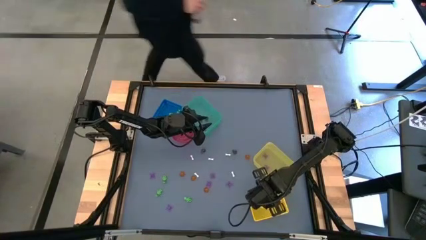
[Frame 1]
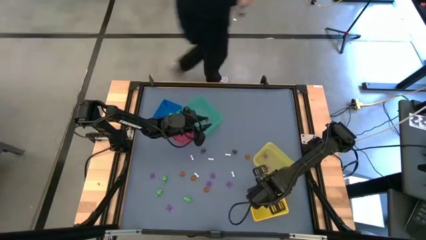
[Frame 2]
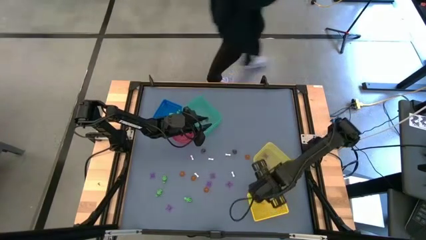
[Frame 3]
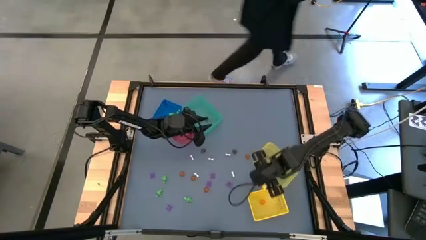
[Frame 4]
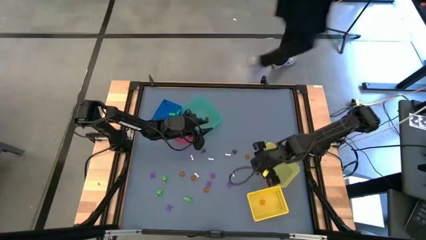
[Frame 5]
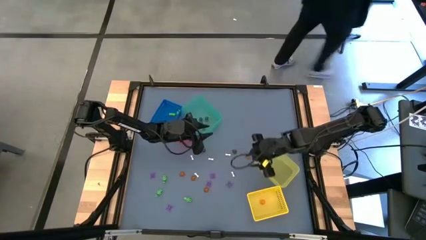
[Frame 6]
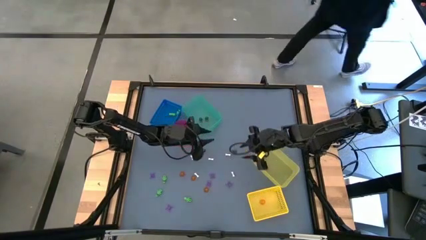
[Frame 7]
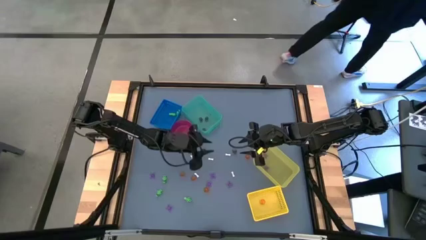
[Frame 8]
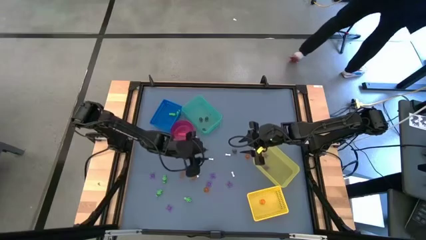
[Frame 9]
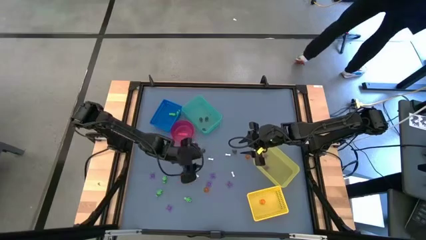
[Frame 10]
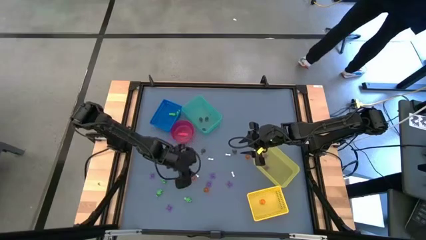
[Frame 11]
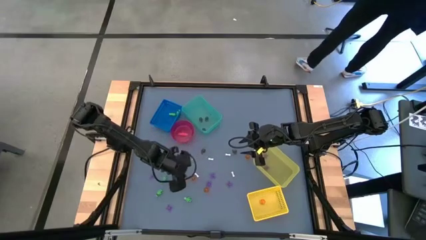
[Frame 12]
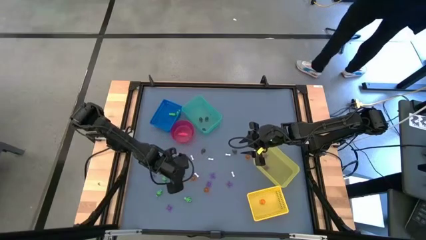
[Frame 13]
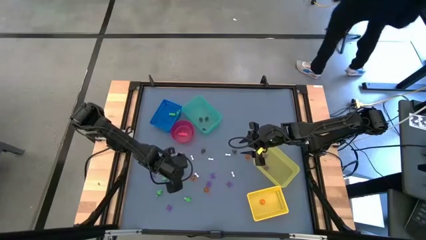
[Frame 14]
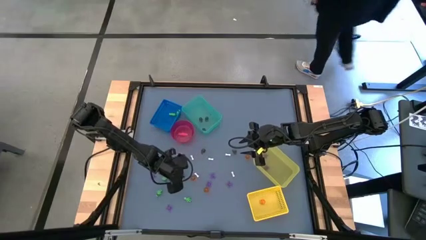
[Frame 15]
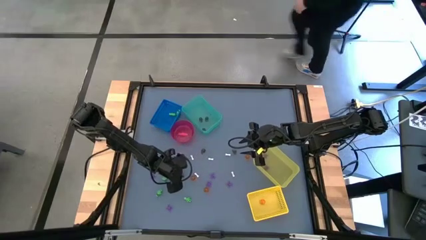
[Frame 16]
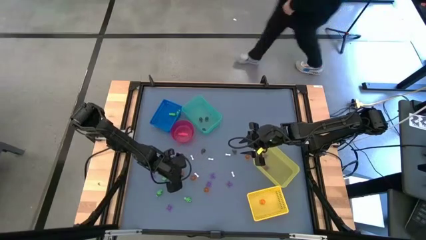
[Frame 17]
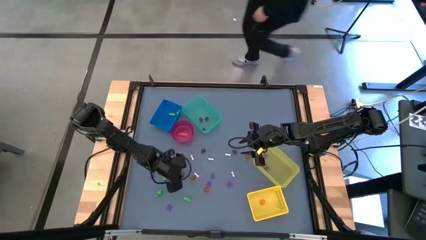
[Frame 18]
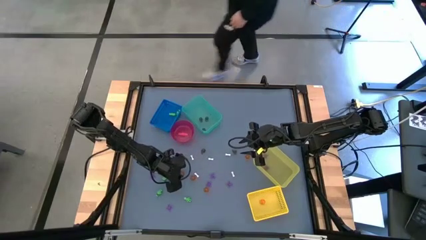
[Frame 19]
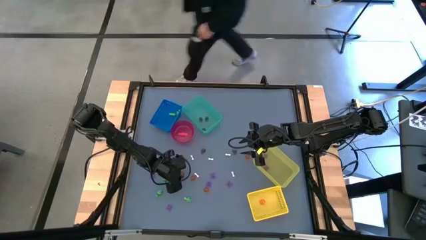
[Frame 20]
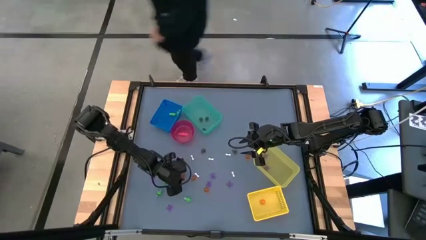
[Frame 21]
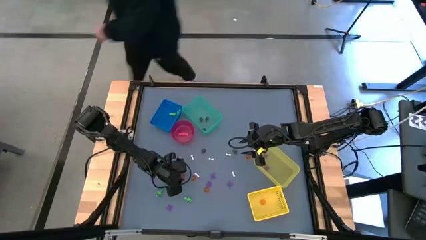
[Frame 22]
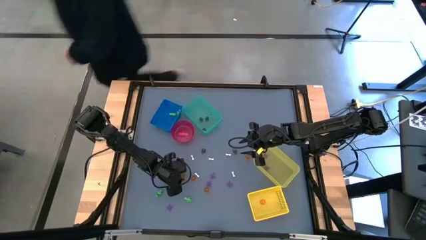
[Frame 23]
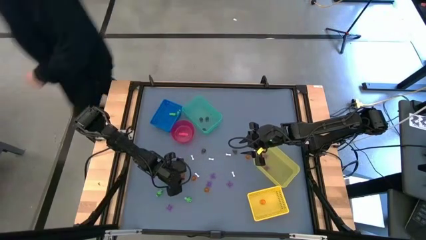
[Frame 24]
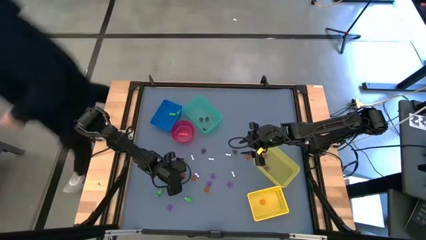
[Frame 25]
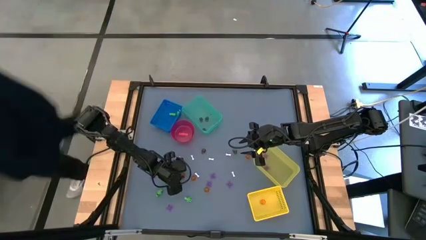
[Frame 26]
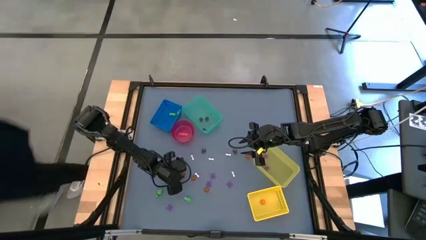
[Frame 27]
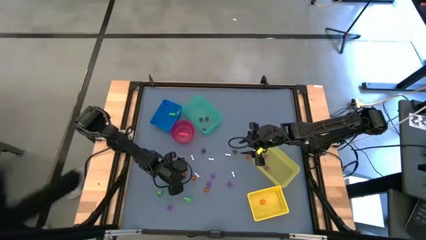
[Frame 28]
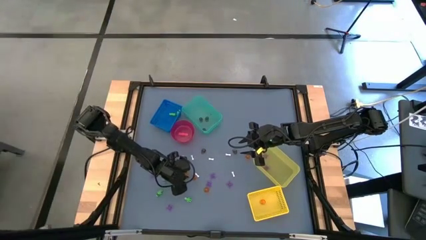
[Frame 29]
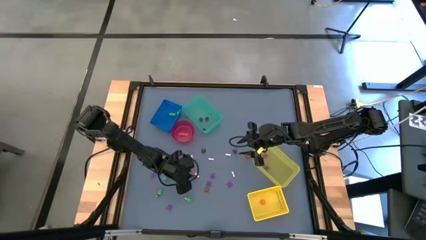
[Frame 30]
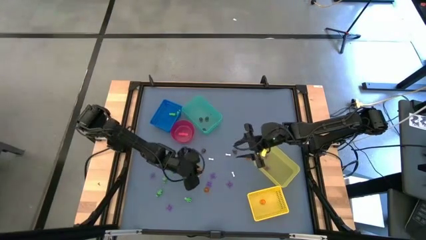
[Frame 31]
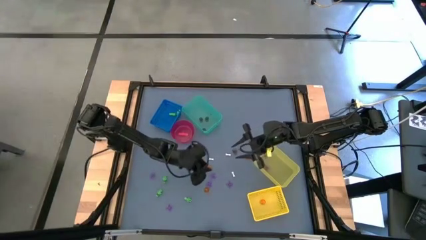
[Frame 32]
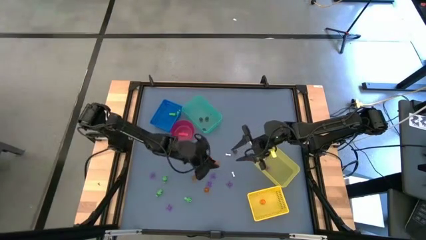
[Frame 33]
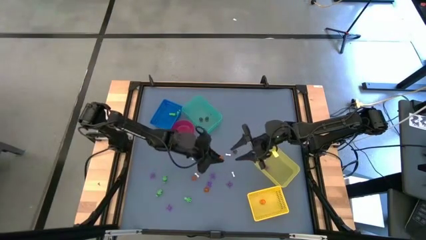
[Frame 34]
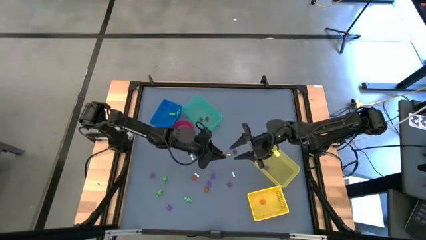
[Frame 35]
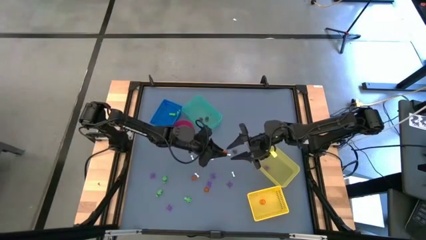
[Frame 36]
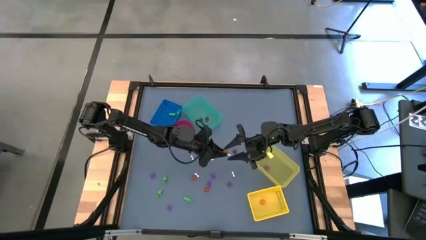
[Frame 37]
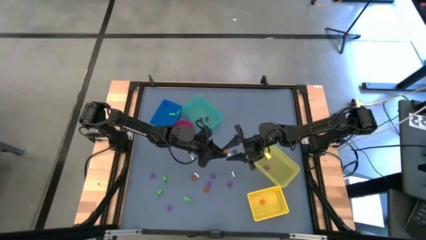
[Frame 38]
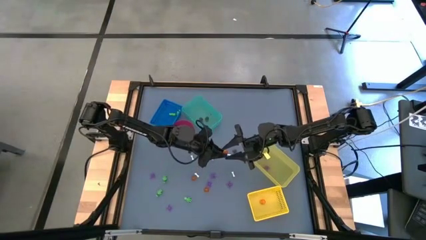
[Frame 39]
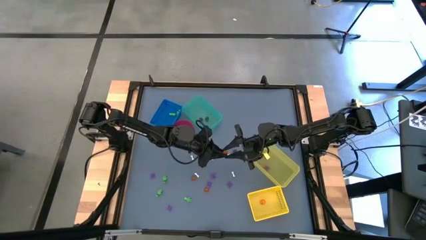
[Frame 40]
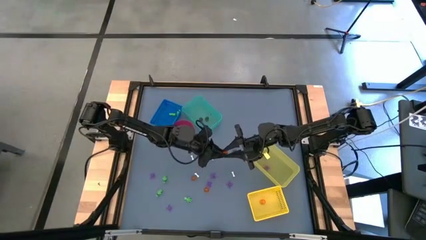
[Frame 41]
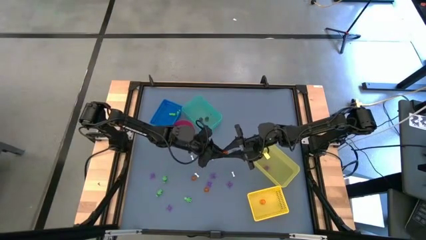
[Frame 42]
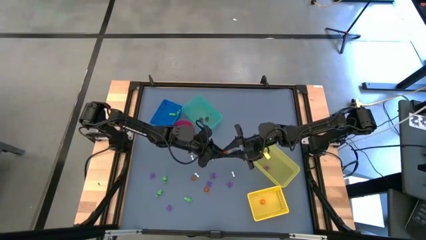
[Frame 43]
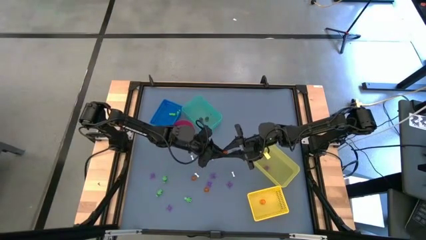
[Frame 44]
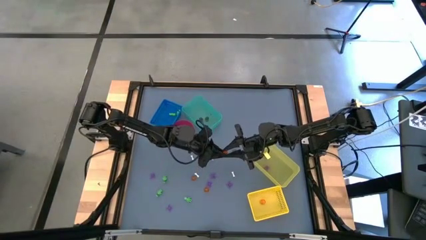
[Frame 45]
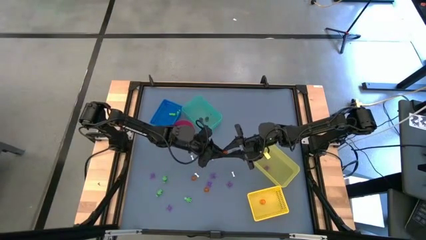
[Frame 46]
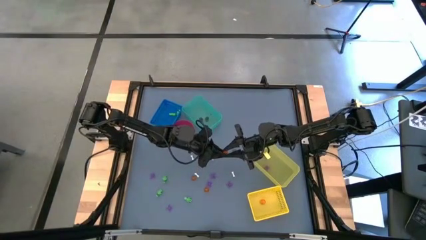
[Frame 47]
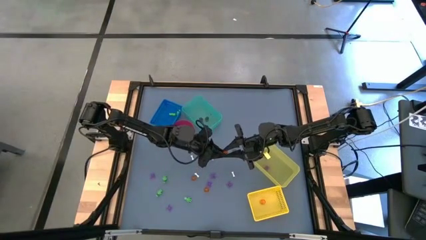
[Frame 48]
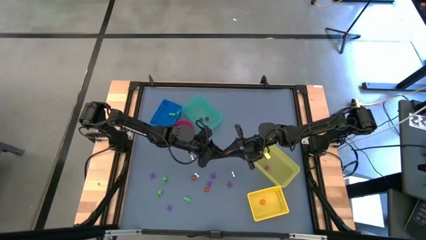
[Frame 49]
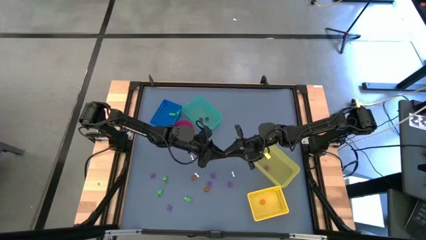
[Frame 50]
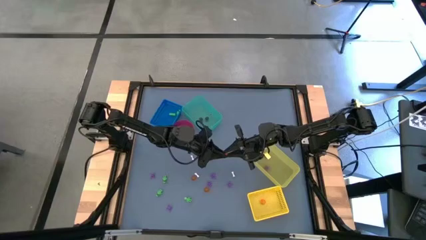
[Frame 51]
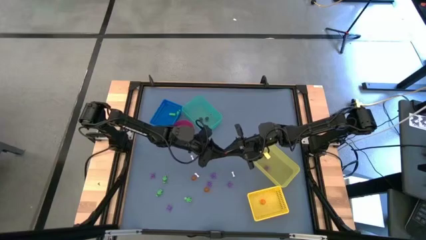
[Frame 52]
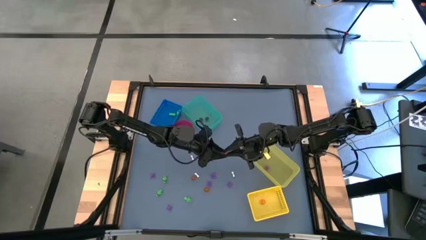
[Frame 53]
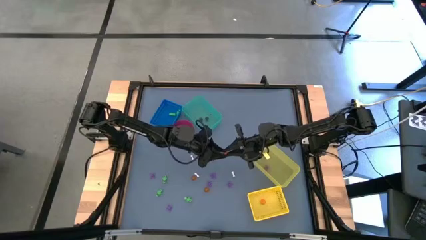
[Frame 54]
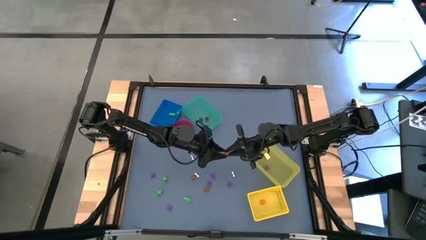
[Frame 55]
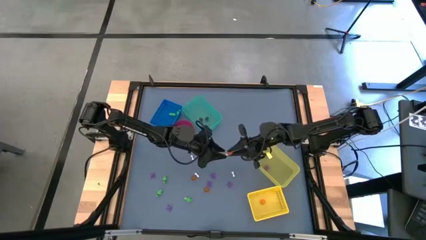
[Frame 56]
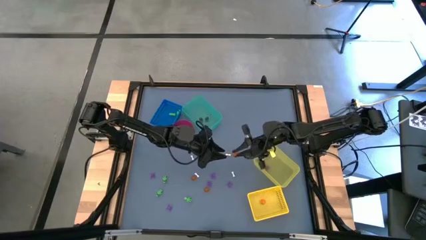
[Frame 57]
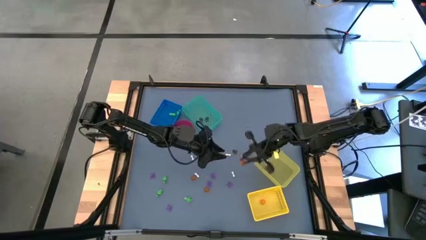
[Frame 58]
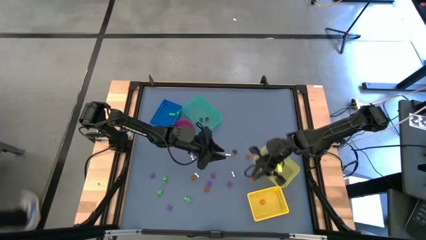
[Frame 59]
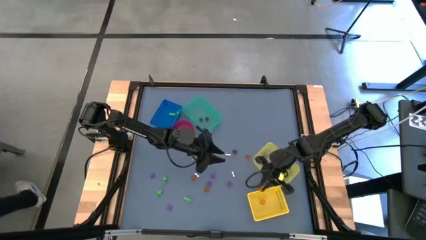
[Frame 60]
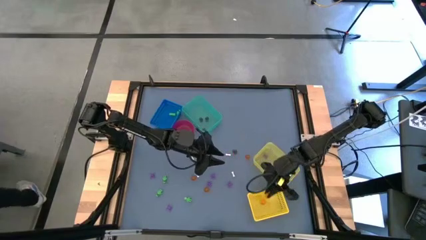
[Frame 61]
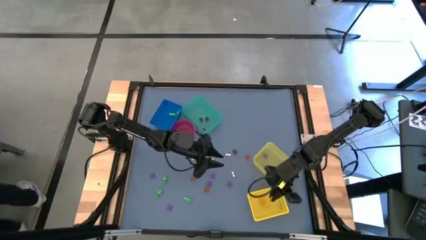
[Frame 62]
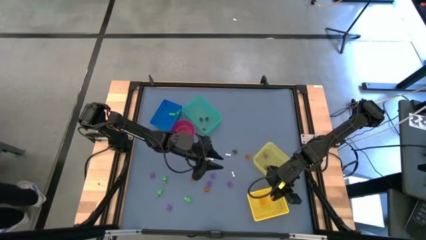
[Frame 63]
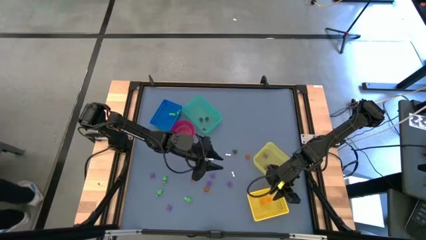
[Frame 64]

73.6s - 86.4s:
Task: Sort Halloween decoration
Put the orange pumpkin toy into the yellow bin

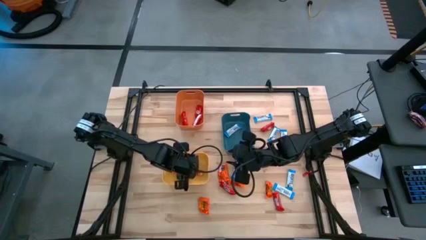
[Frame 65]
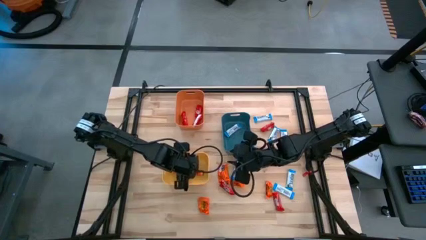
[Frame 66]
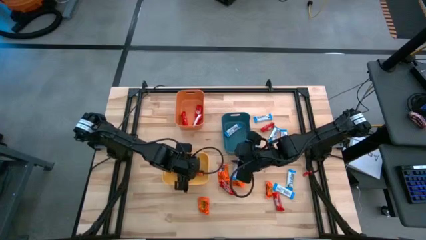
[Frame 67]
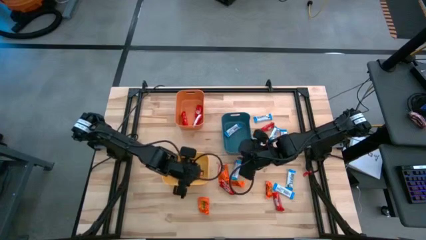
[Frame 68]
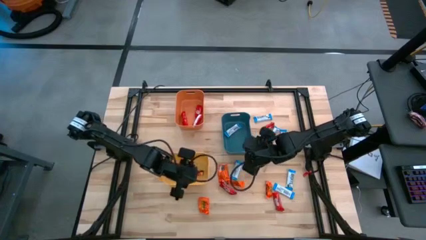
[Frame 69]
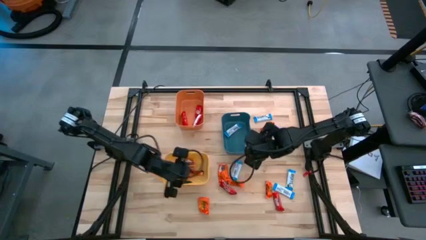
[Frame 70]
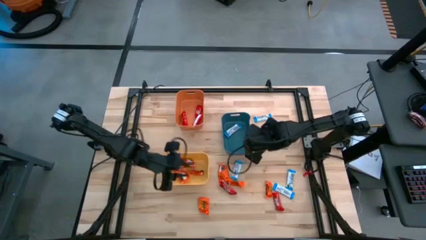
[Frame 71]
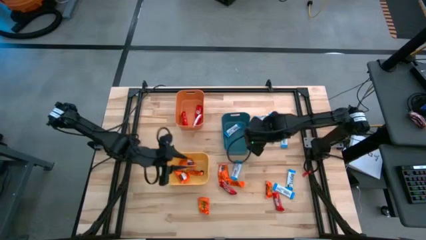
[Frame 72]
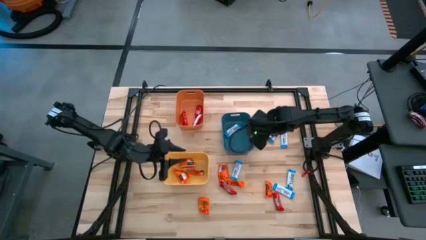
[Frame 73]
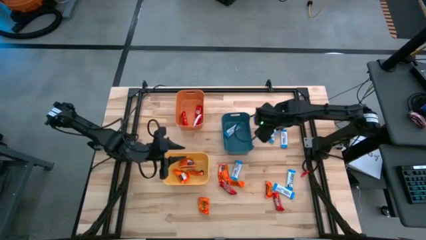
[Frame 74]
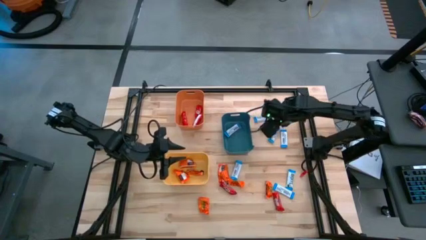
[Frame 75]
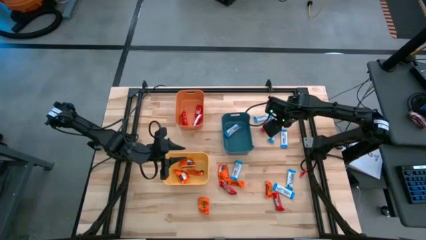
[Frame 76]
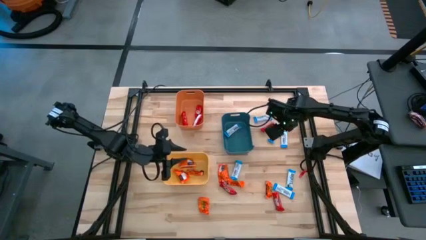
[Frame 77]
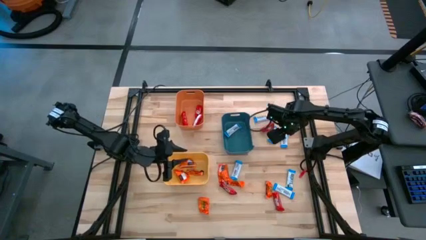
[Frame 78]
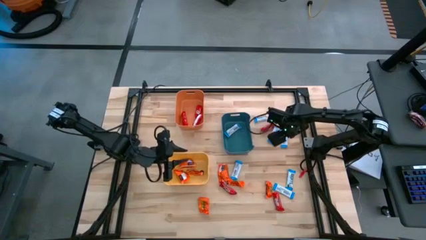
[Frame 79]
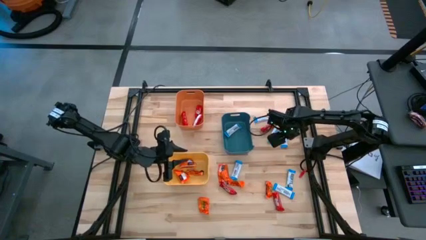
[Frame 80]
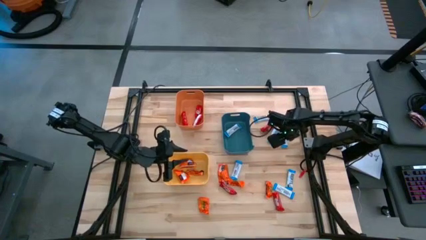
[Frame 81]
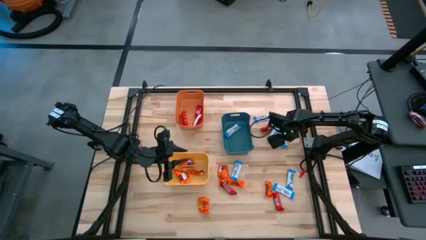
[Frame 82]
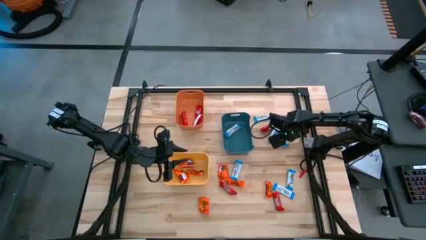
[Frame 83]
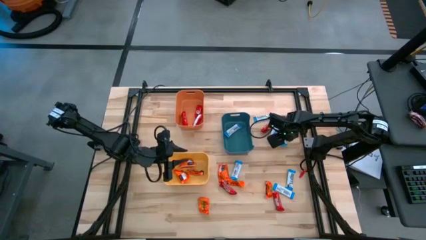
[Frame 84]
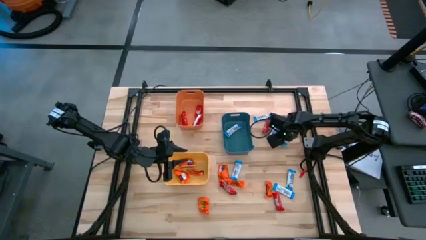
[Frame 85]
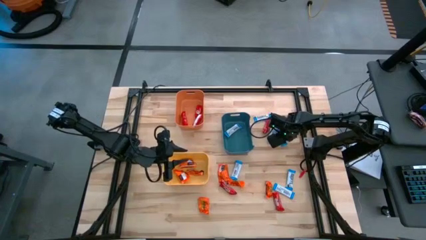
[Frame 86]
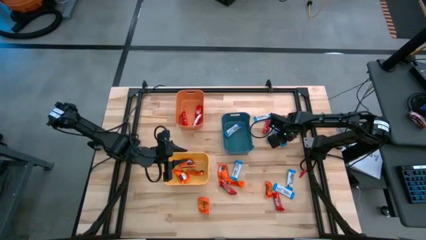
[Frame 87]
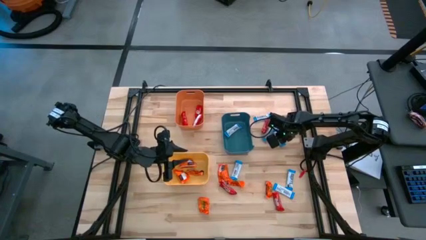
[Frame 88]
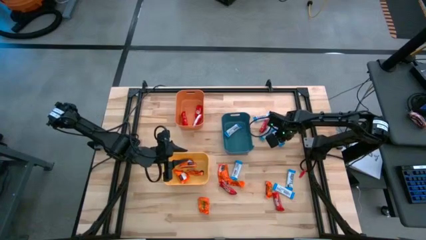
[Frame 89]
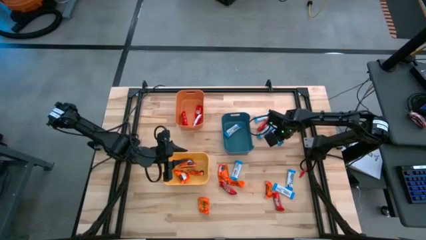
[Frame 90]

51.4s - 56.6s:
Task: Organize candy in baskets
Put the white chocolate into the blue bin
